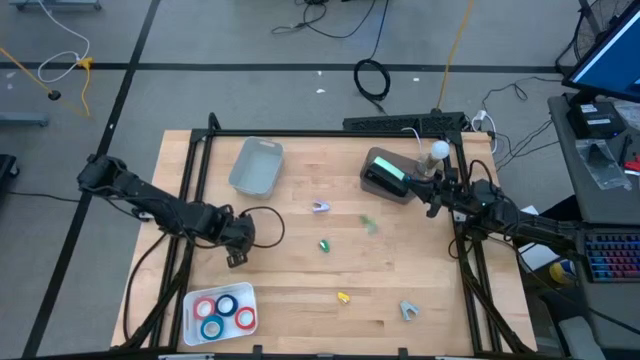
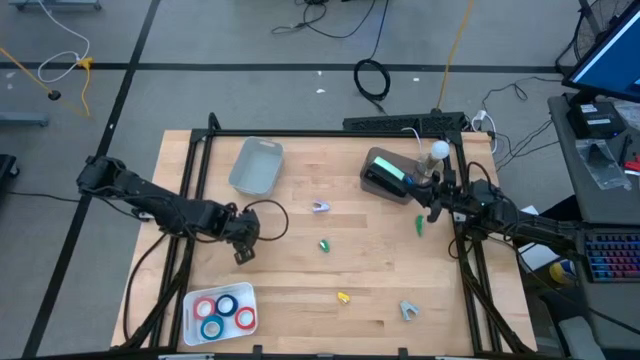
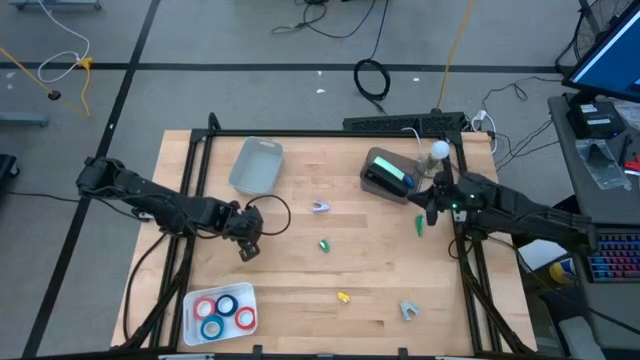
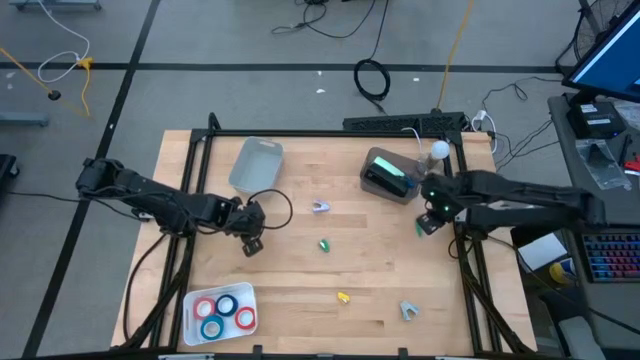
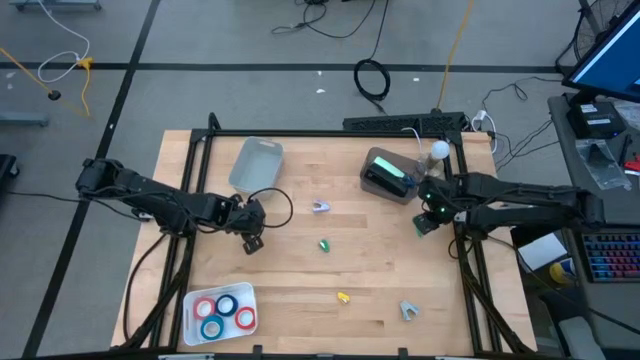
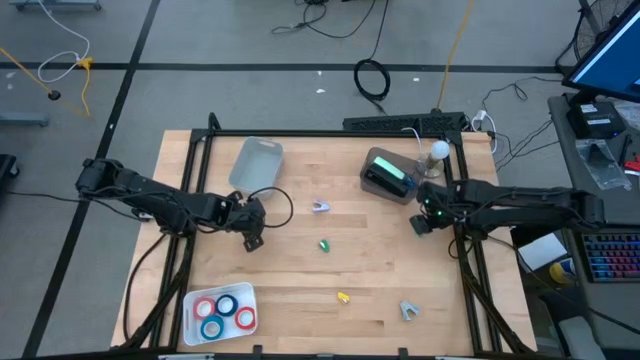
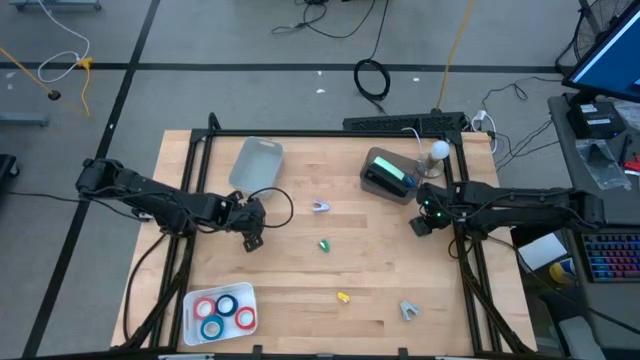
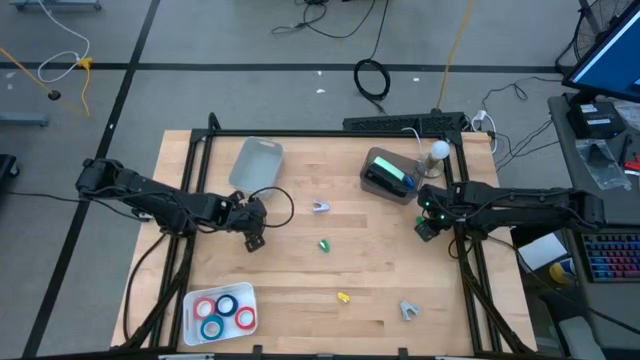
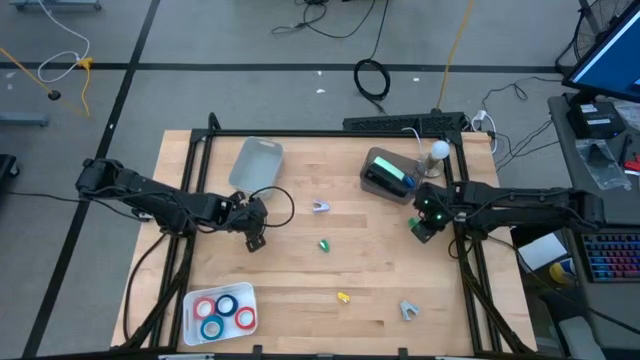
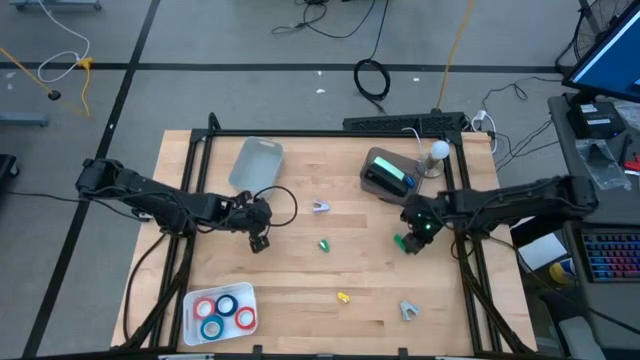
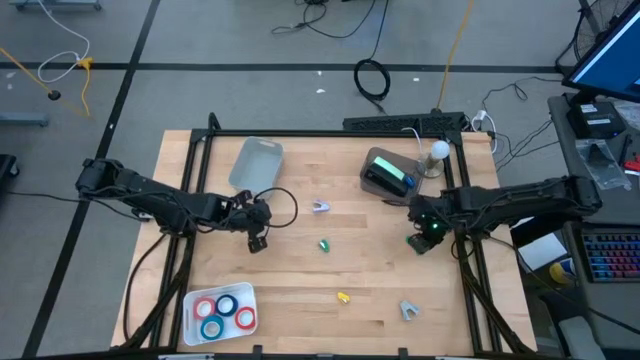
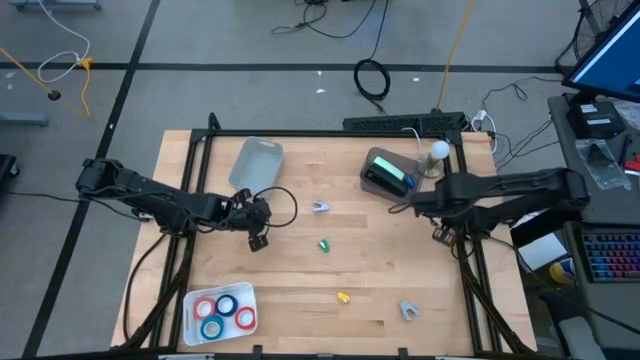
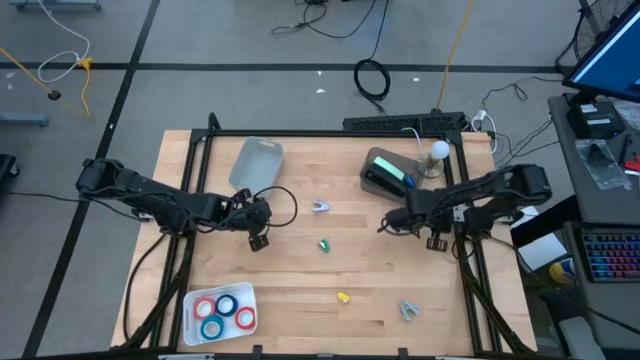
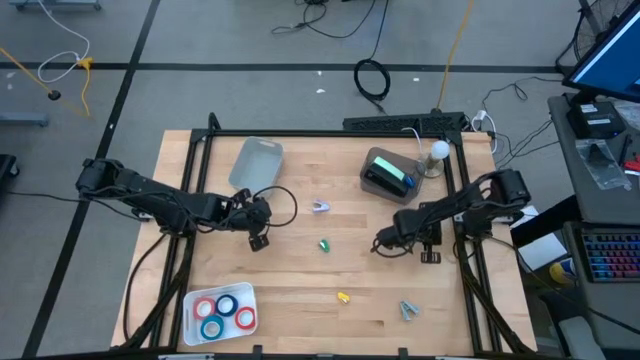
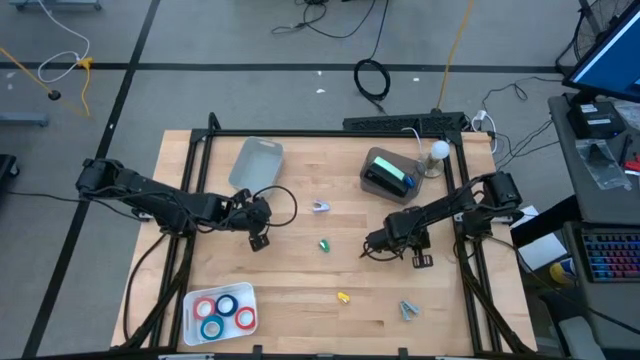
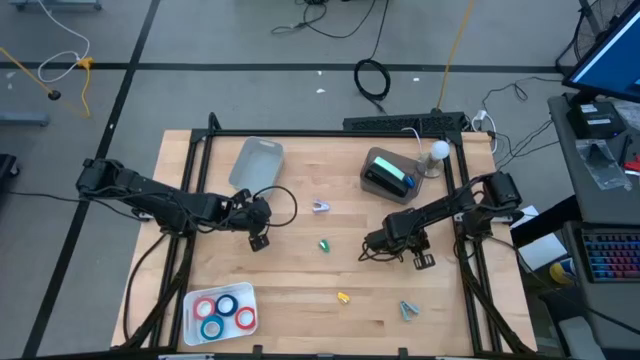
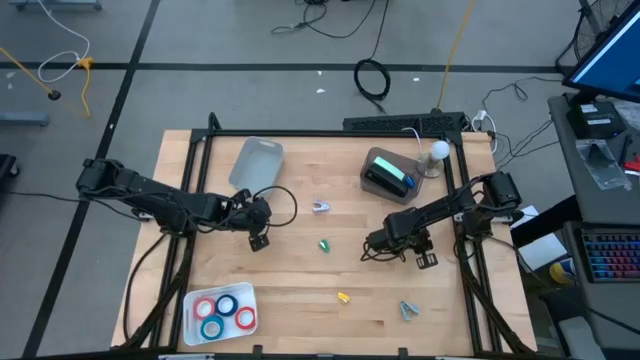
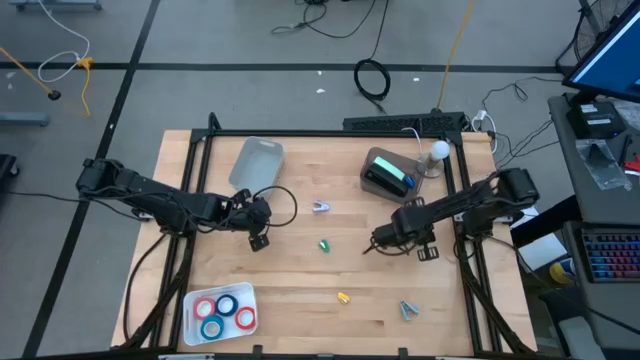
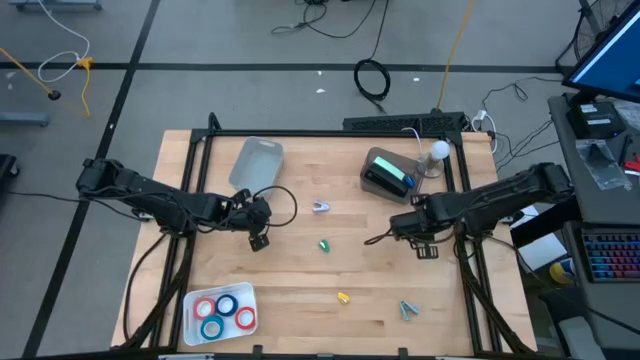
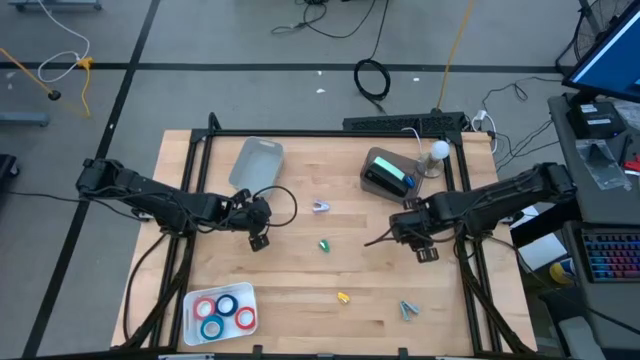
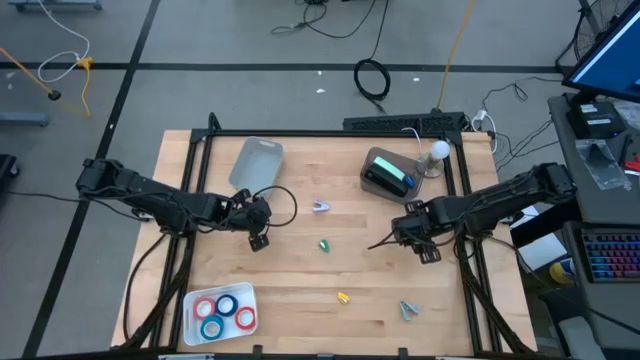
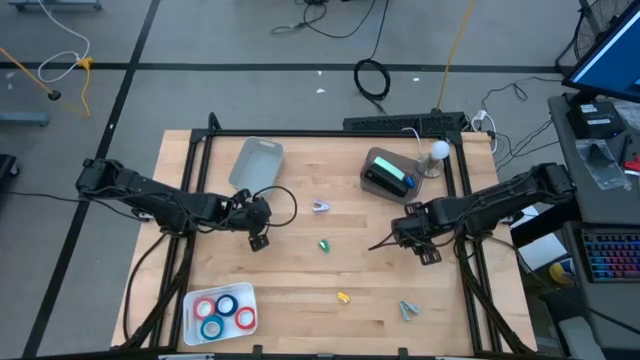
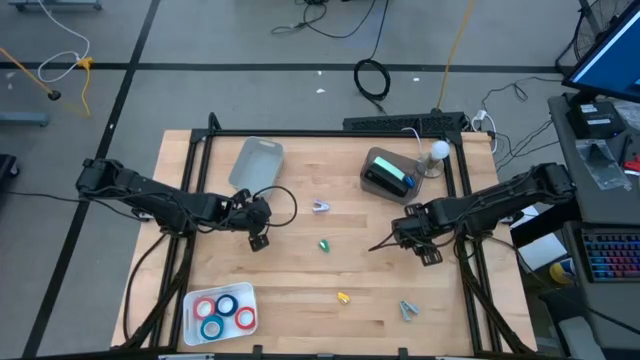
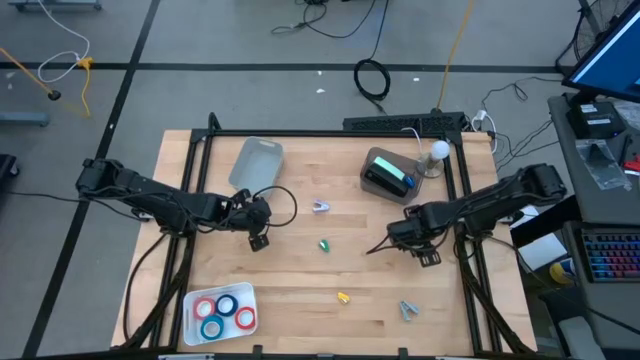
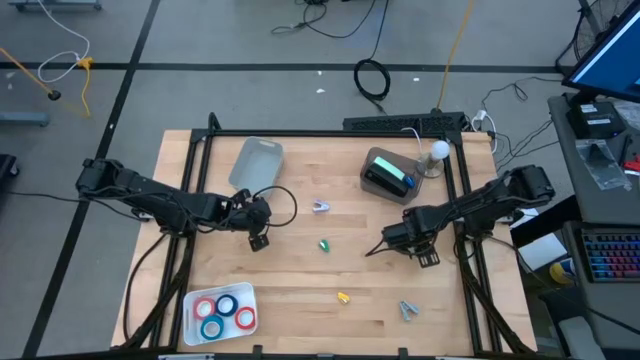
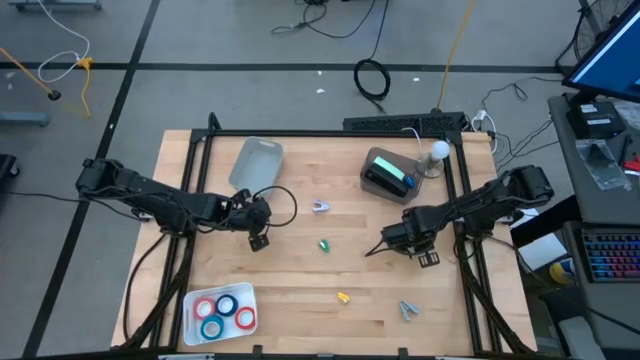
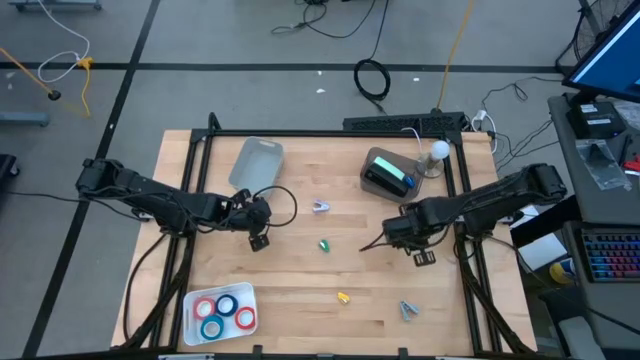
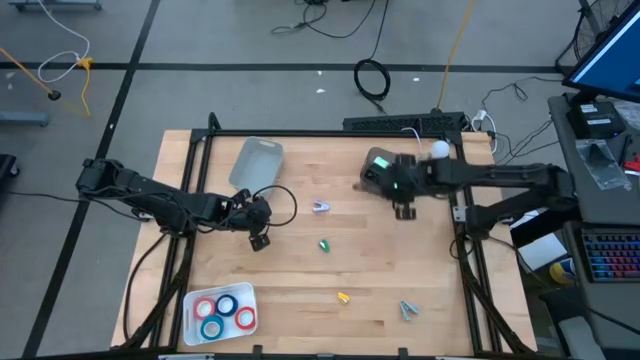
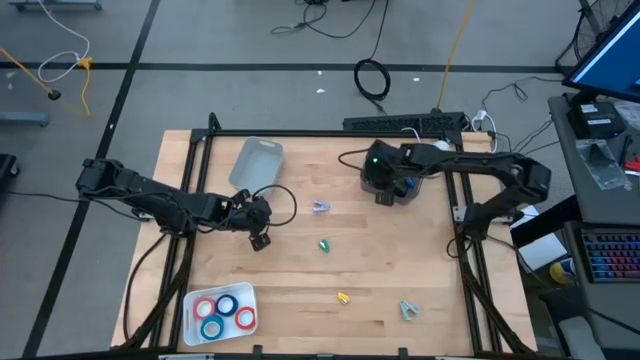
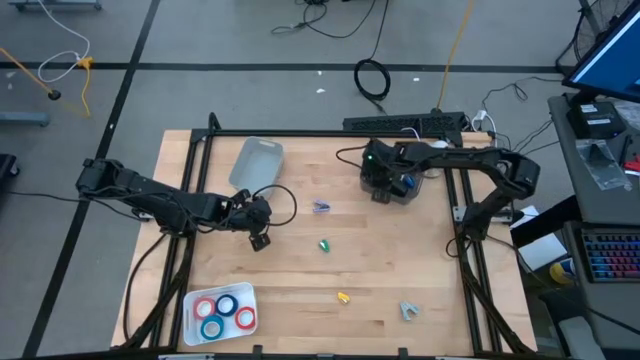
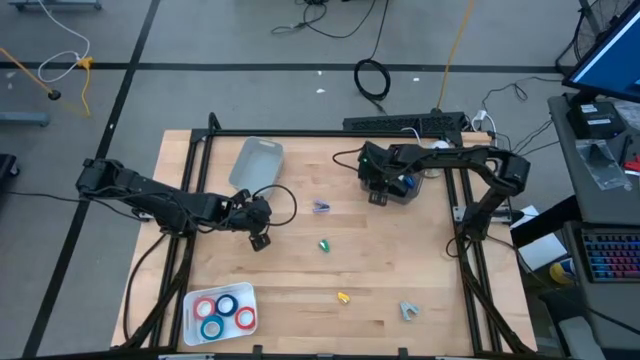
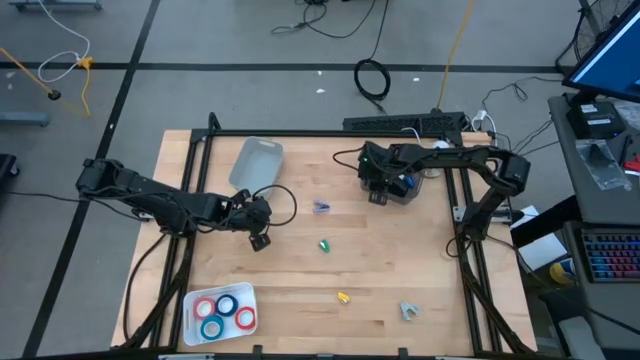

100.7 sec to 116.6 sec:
Task: Pick and place Stapler, Stapler remover, tape
Put the left green small stapler into the black bin

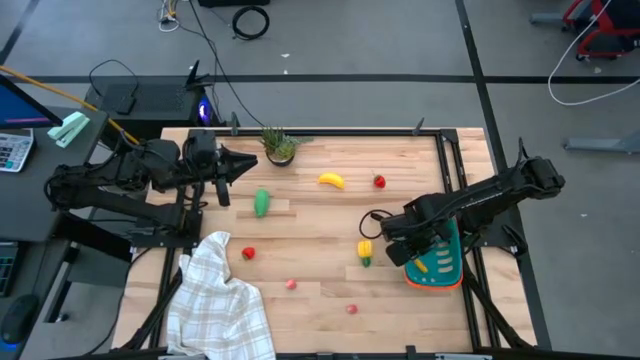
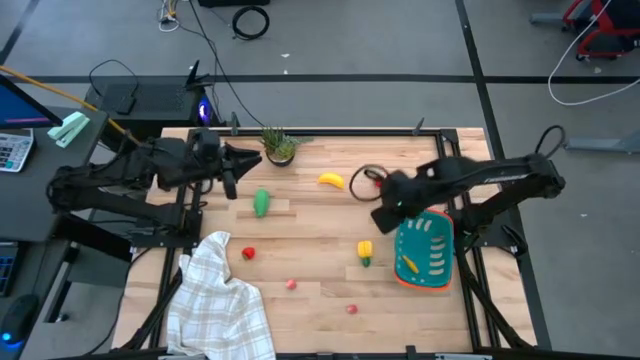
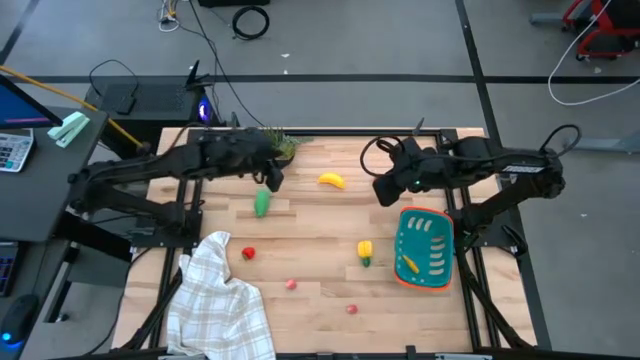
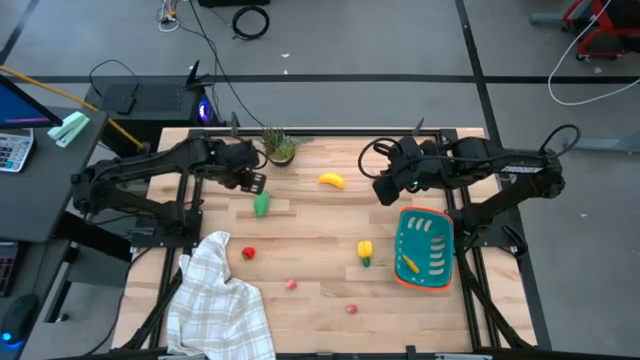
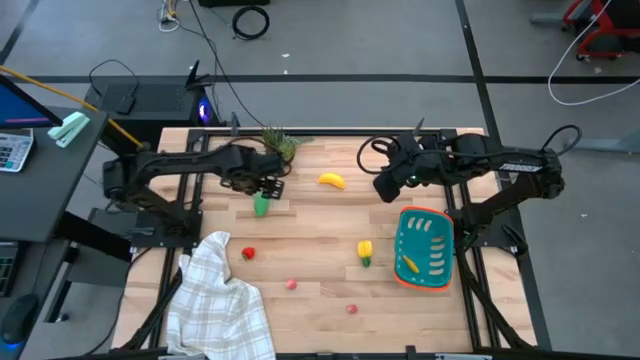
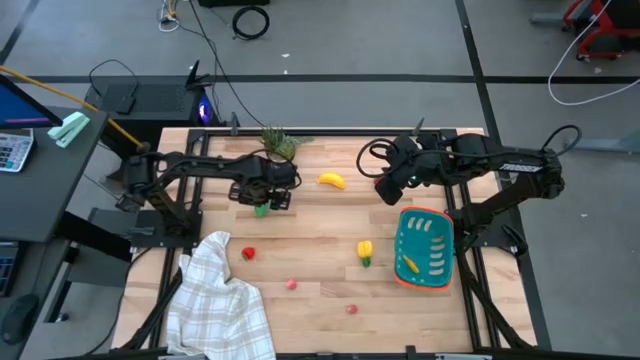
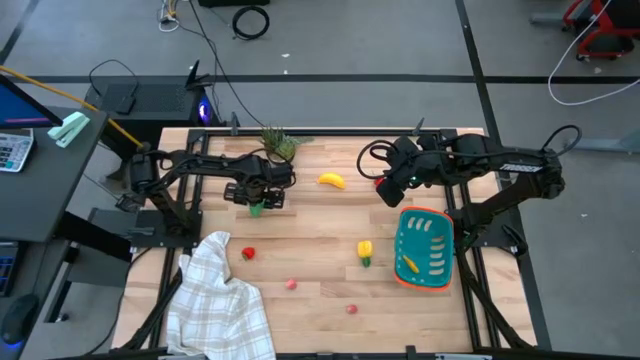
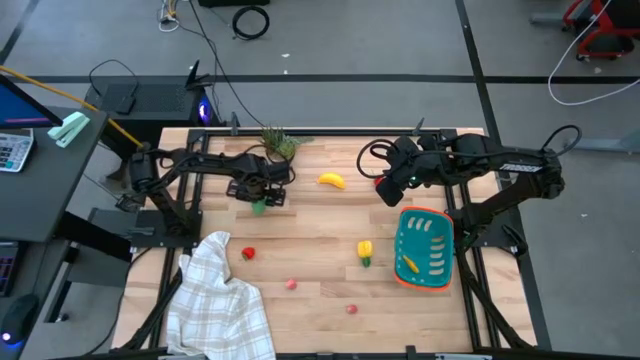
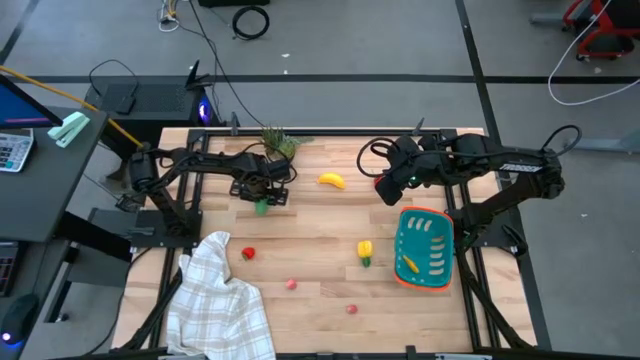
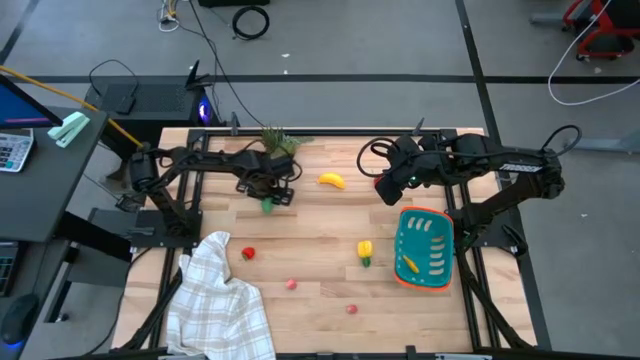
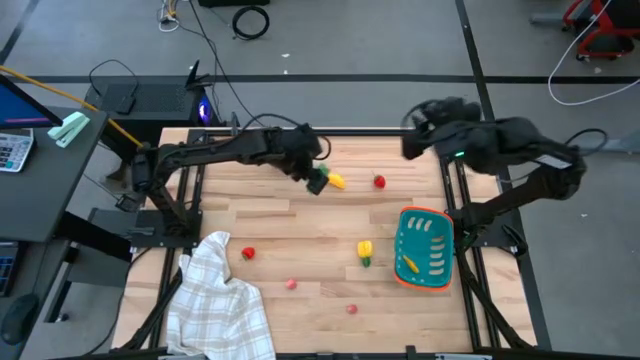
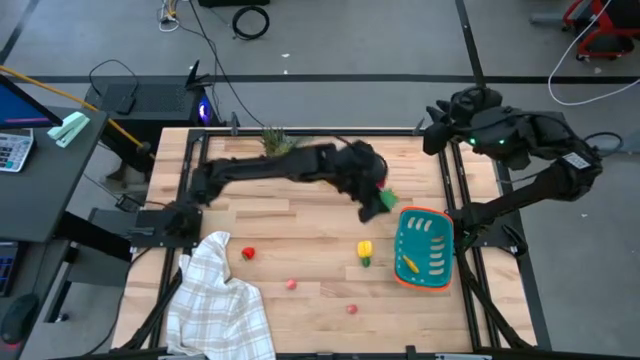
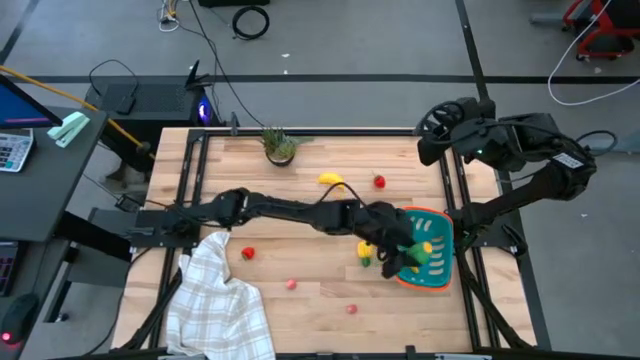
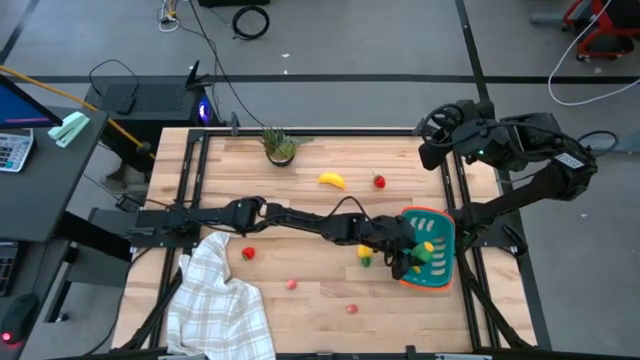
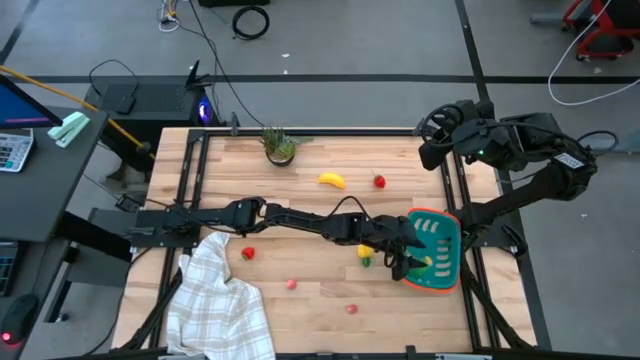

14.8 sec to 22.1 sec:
Task: Pick and placing Produce into tupperware
Put the green corn into the blue basket
